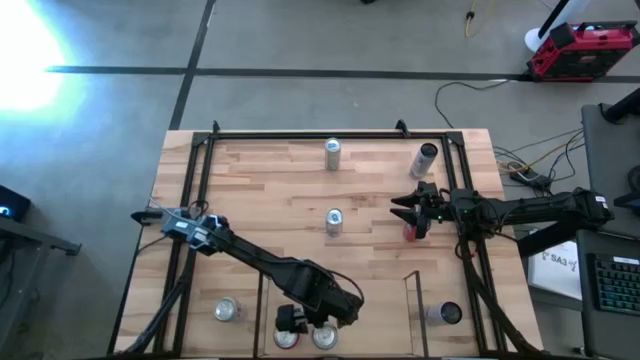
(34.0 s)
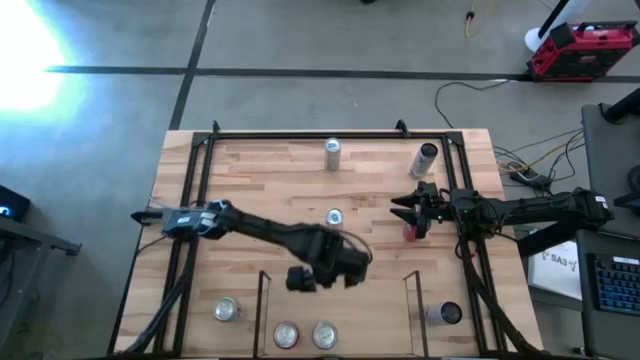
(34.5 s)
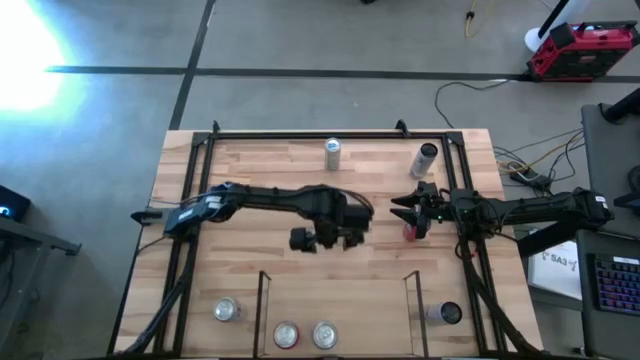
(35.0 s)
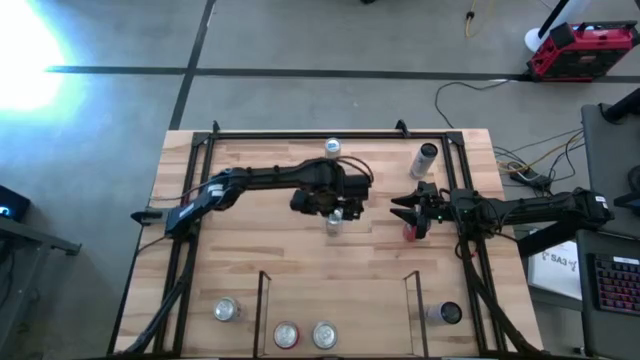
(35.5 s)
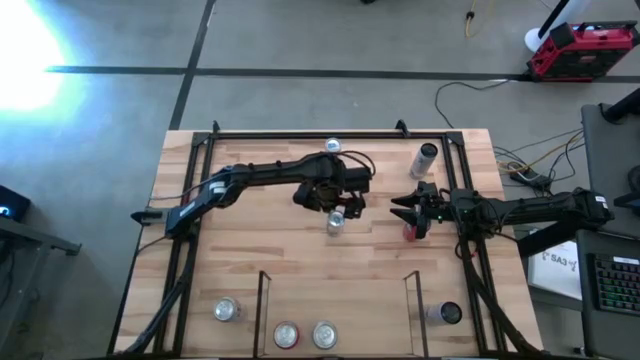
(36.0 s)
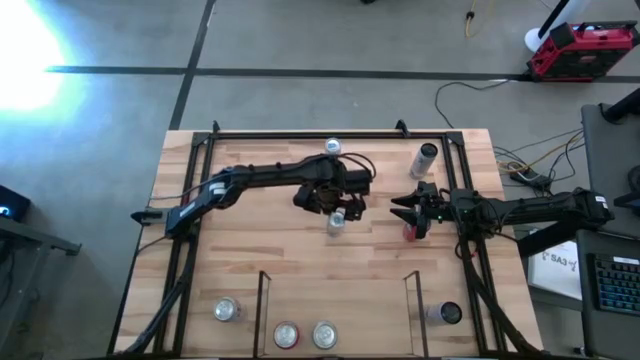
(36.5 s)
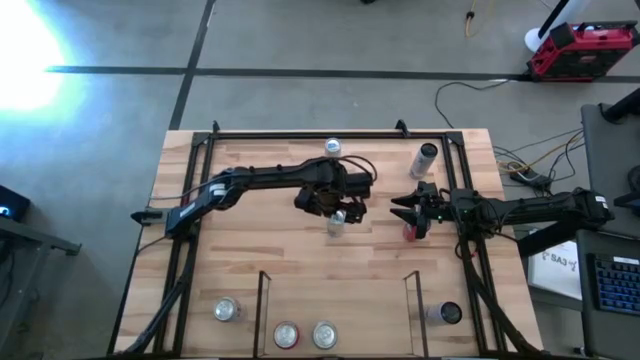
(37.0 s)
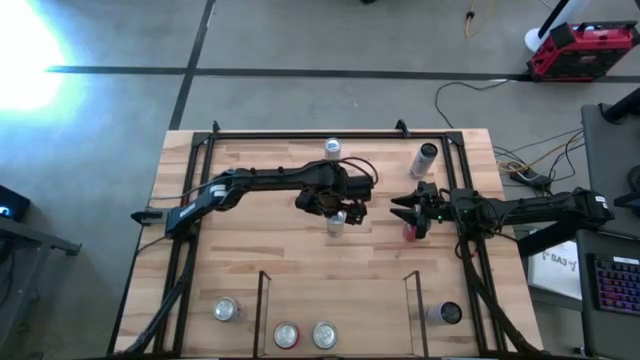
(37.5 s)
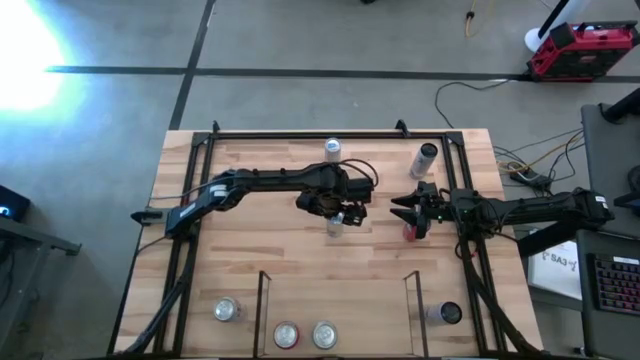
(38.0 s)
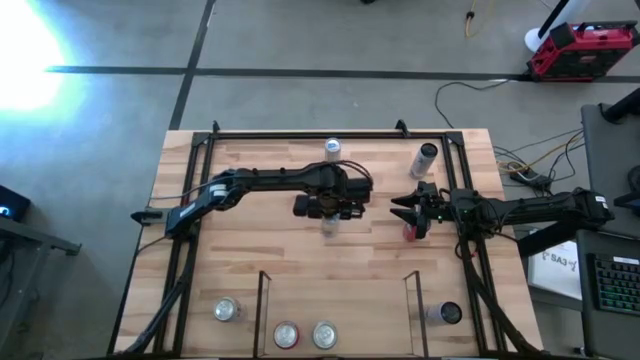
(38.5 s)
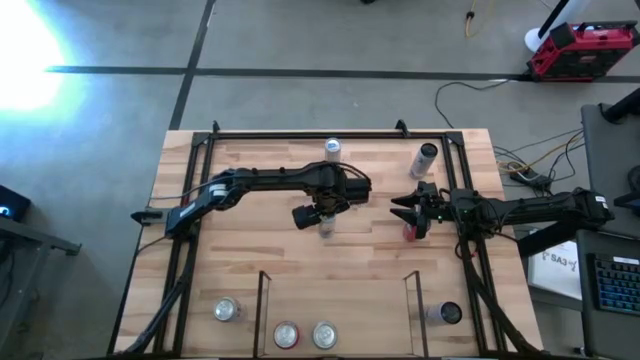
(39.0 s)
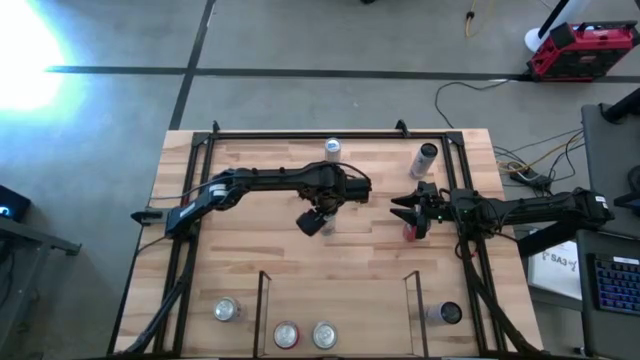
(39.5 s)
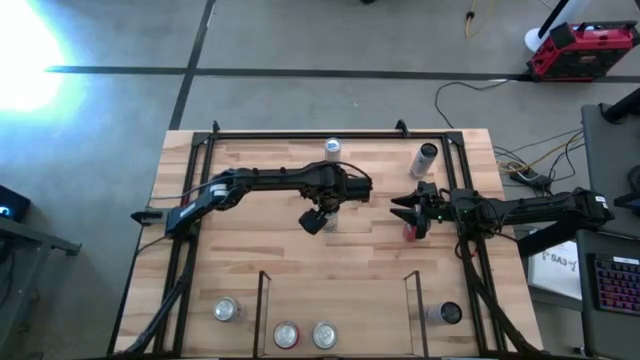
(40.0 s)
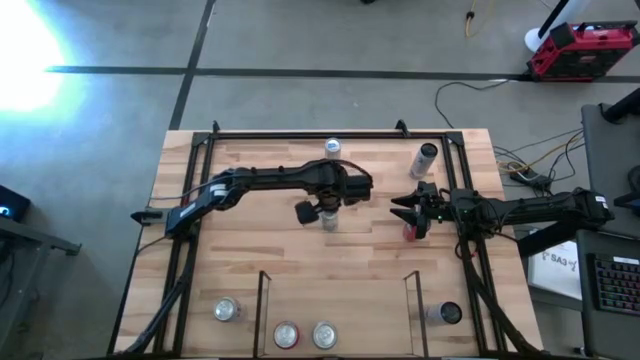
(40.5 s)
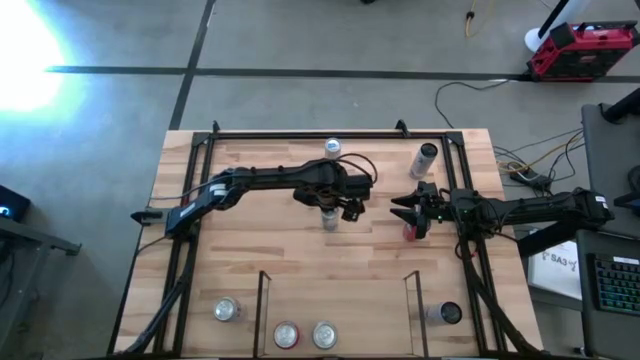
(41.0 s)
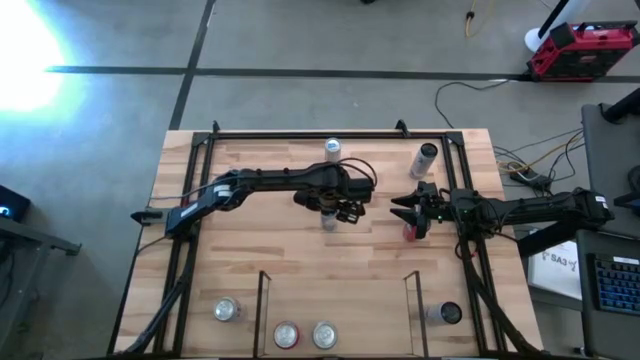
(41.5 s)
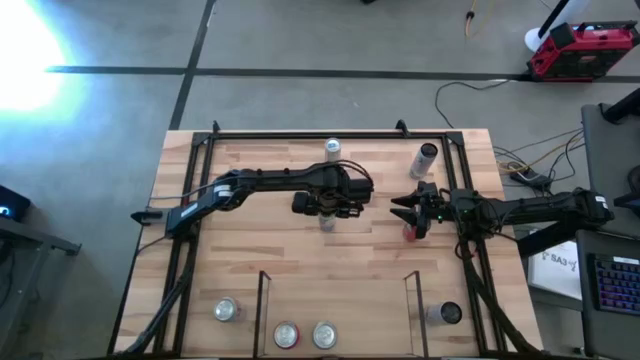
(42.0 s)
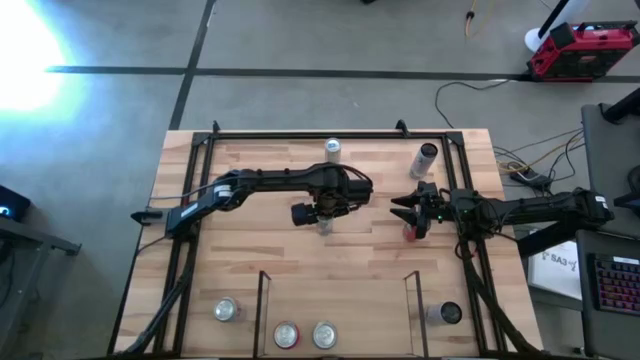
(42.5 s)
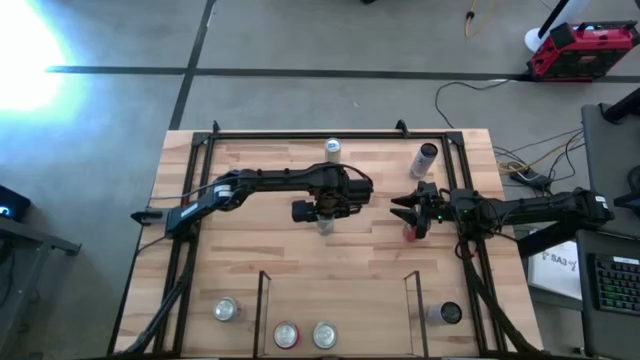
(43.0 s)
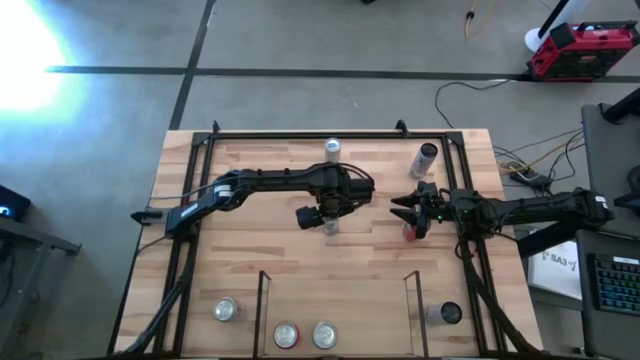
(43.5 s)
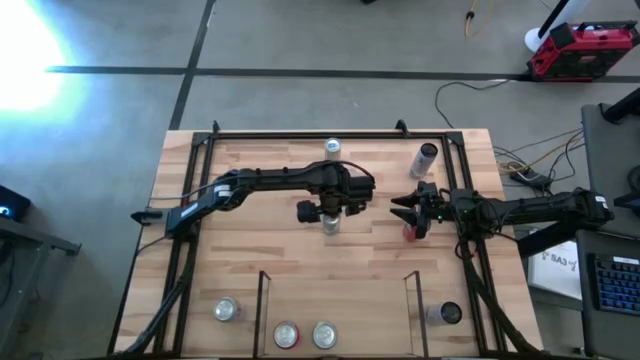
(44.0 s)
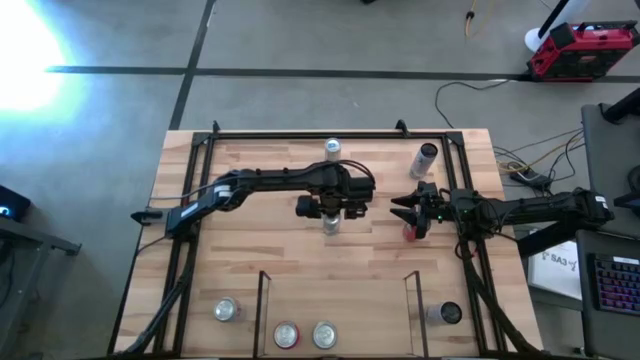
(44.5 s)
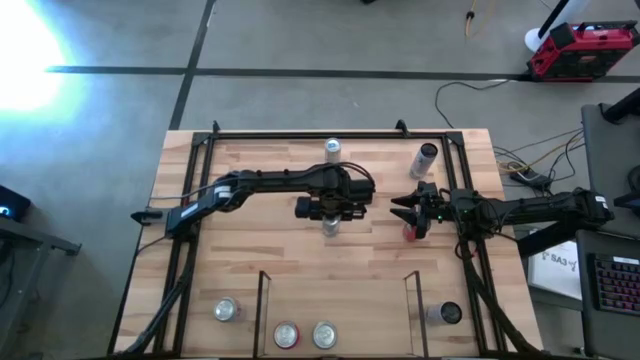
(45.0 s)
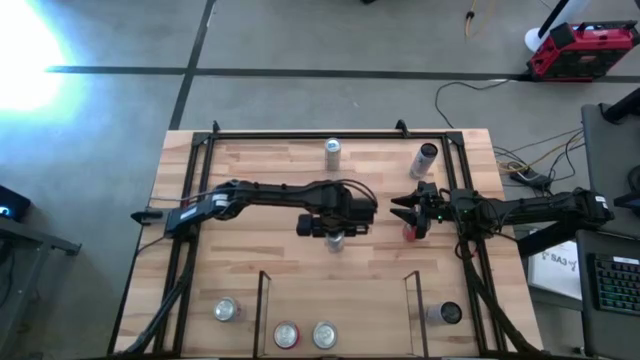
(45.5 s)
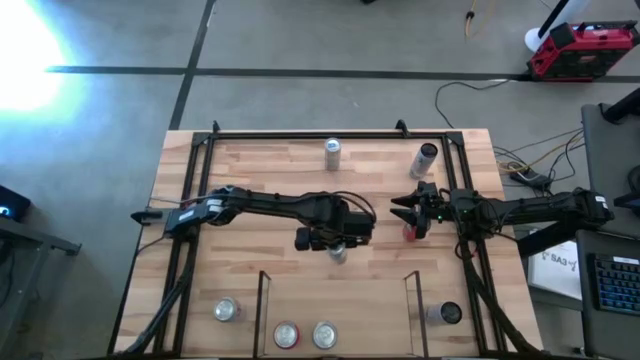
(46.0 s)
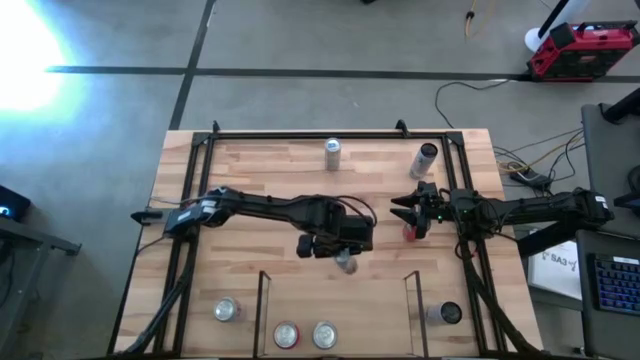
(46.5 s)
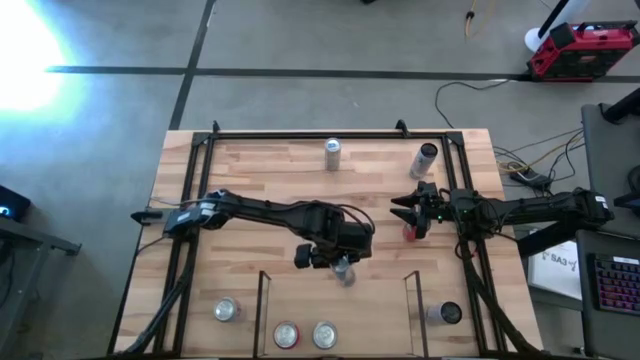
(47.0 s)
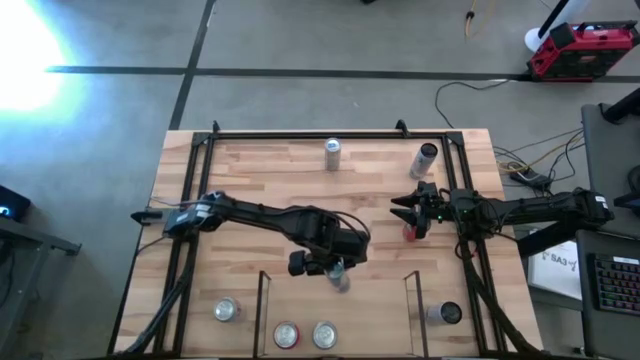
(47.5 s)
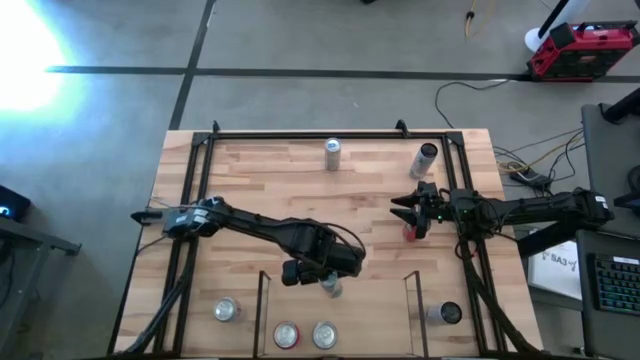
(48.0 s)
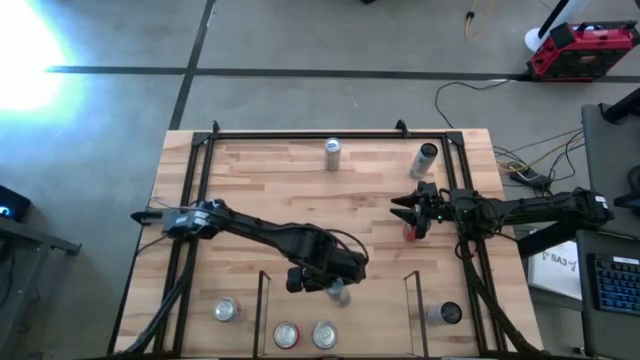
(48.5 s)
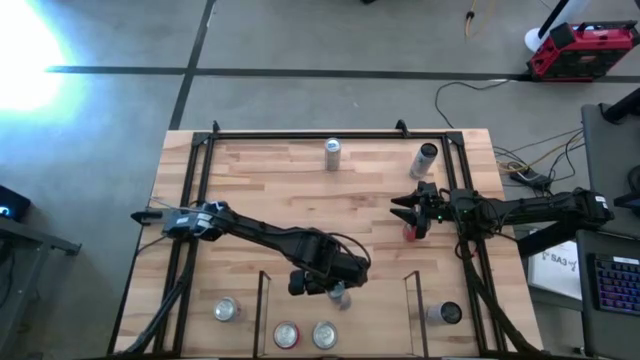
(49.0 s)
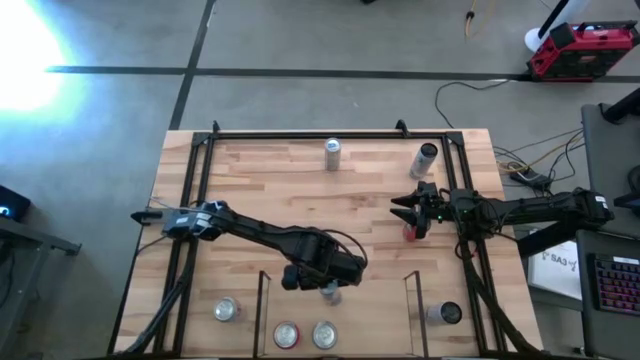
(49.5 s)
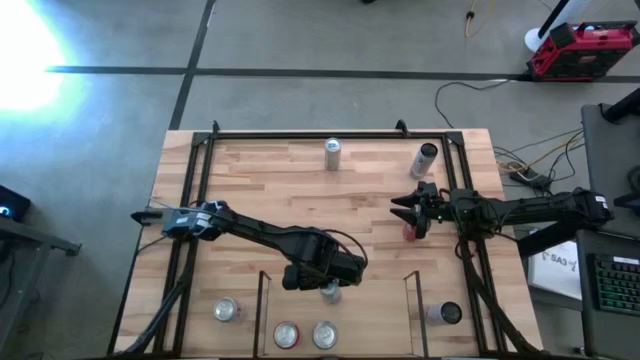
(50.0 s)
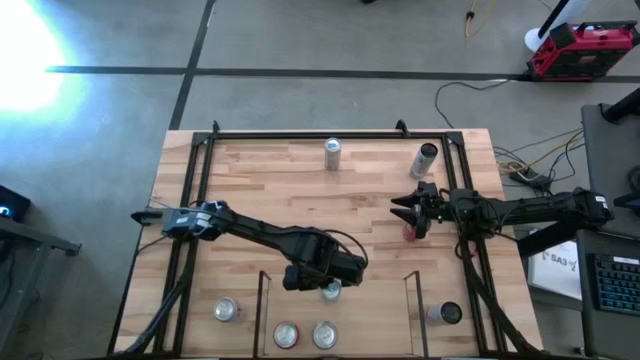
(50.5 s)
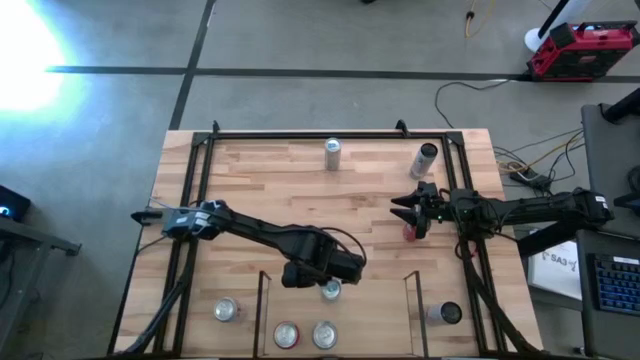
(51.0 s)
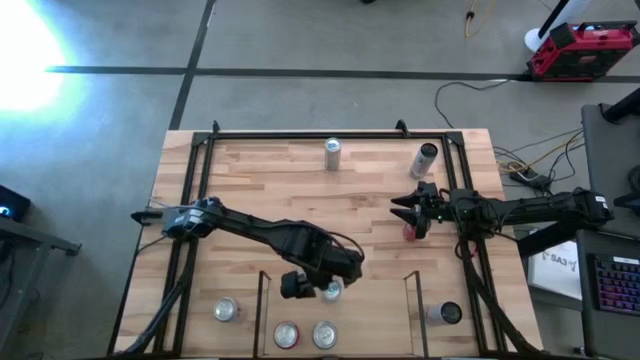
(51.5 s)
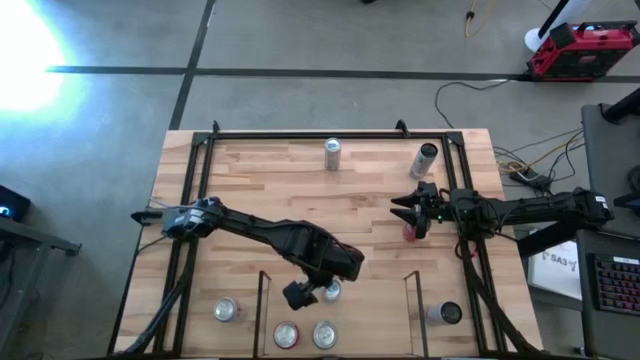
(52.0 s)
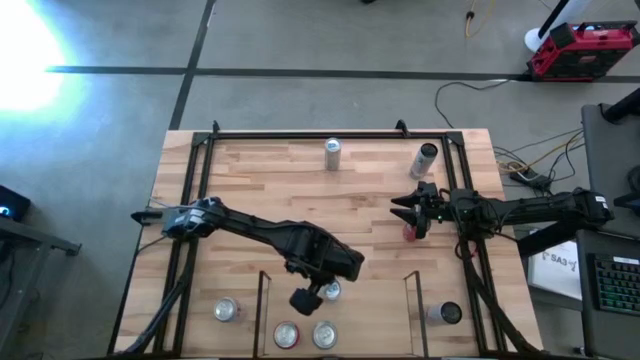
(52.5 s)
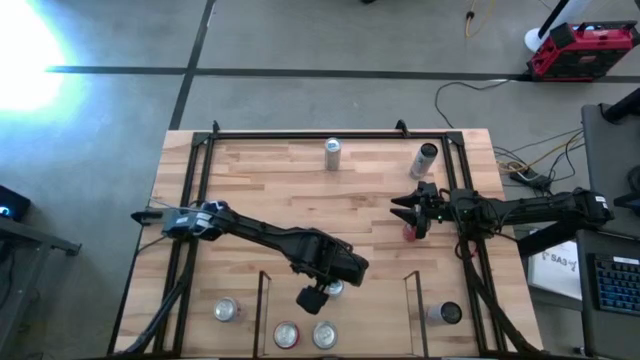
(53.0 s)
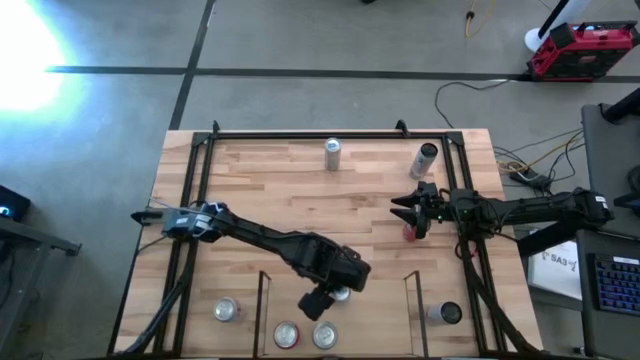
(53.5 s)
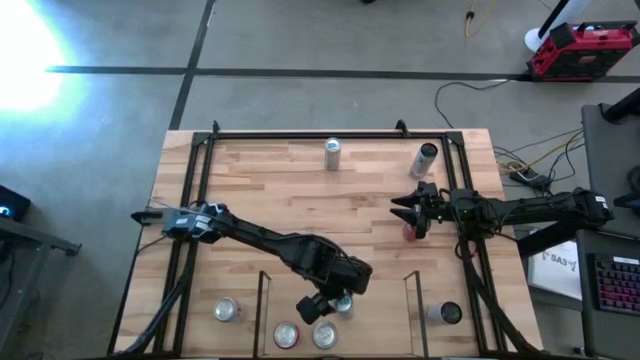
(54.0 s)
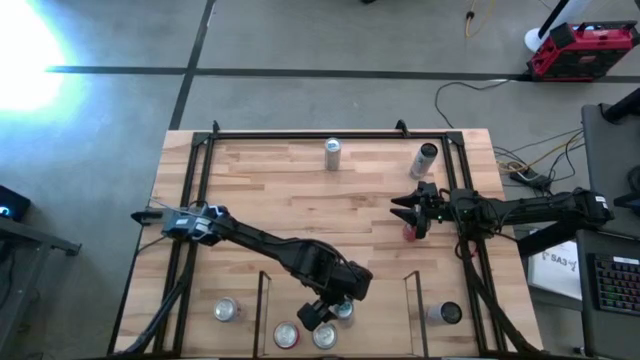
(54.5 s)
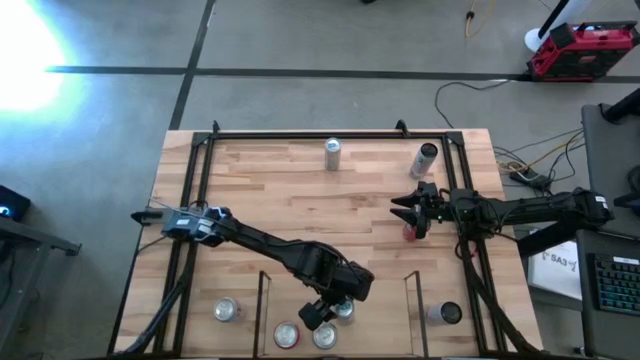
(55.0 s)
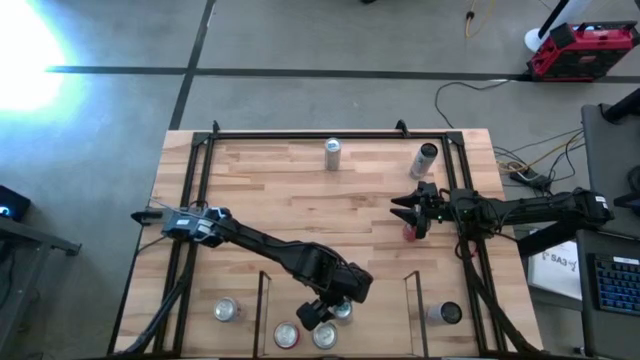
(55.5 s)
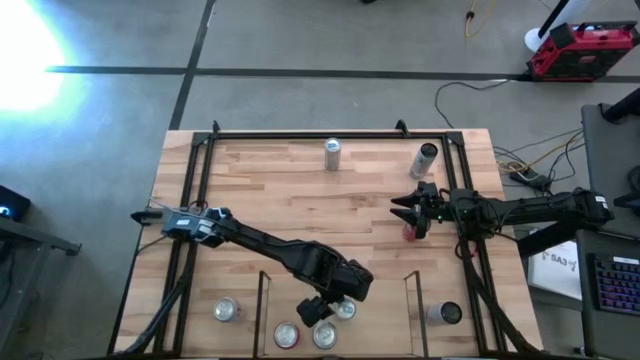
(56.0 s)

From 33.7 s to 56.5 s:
Task: Place canned beverage on shelf
Put the bottom blue soda can on the shelf

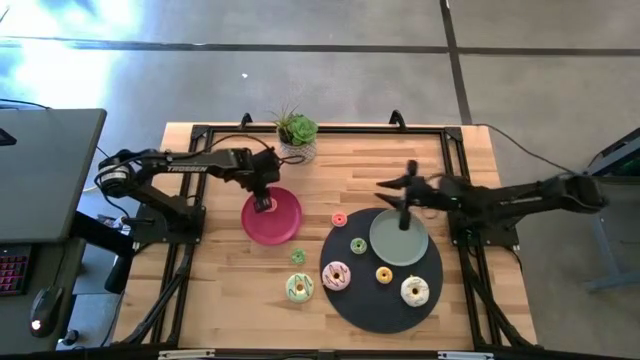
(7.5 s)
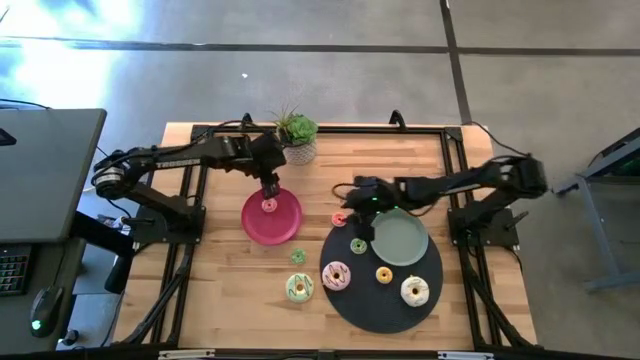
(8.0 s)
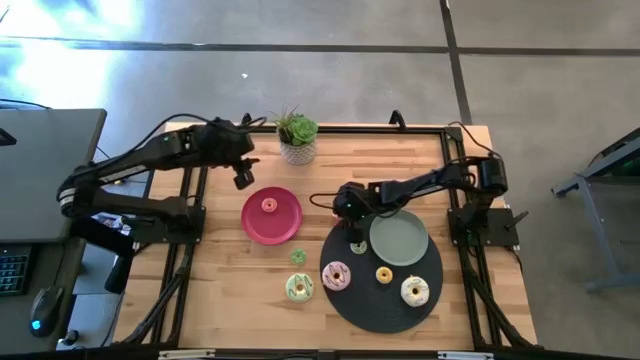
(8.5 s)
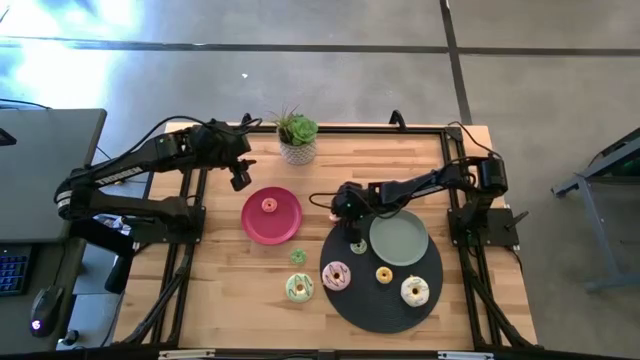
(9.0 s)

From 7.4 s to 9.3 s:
Task: Pick & Place donuts
Put the small pink donut on the pink plate
